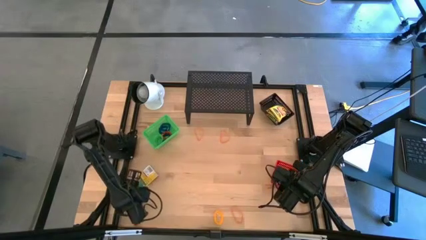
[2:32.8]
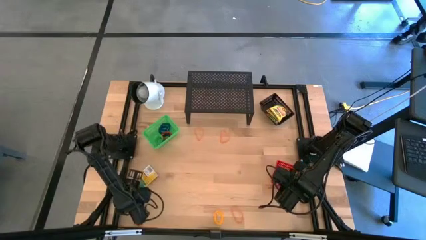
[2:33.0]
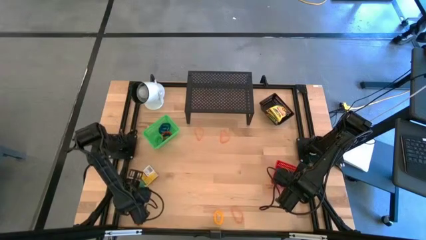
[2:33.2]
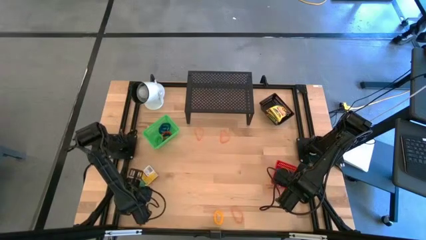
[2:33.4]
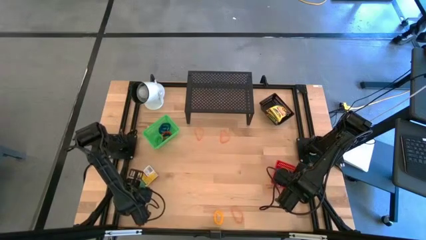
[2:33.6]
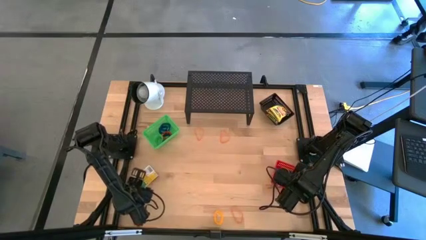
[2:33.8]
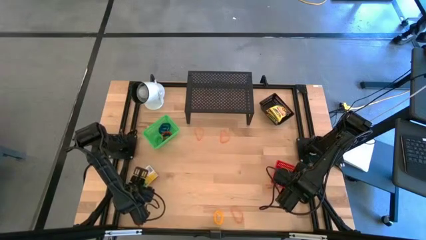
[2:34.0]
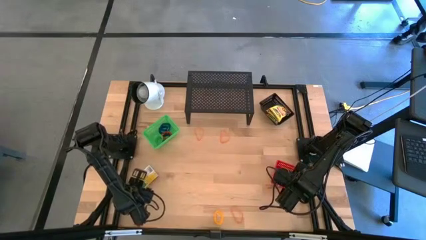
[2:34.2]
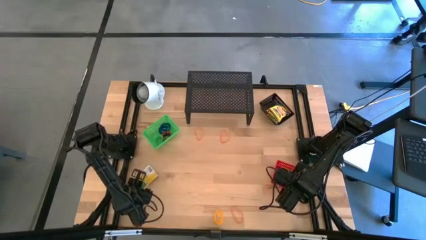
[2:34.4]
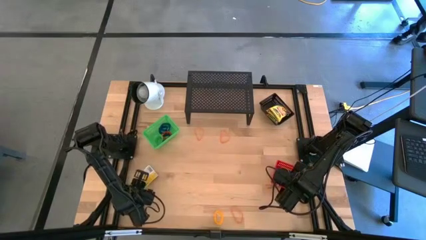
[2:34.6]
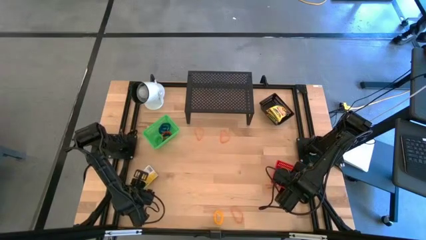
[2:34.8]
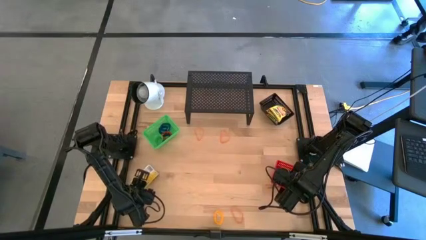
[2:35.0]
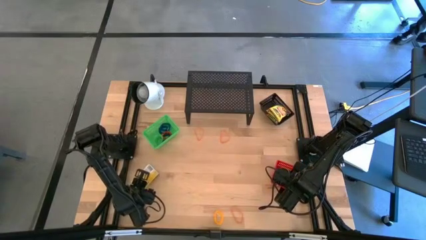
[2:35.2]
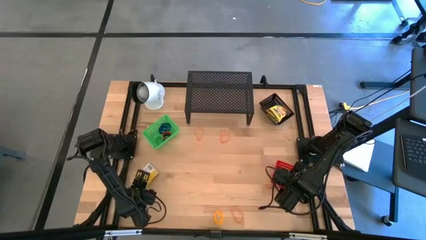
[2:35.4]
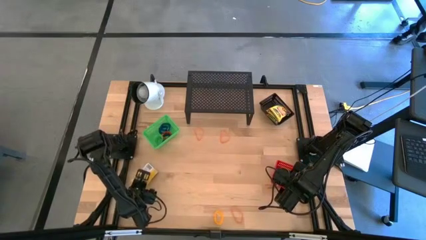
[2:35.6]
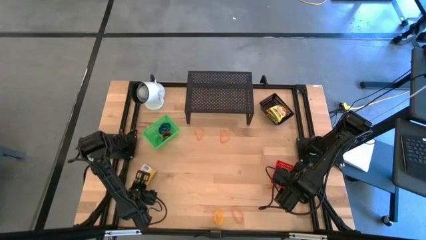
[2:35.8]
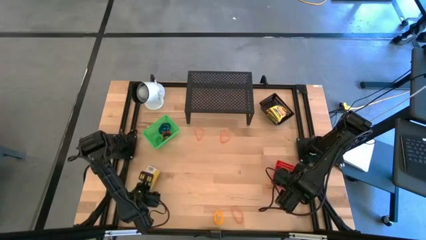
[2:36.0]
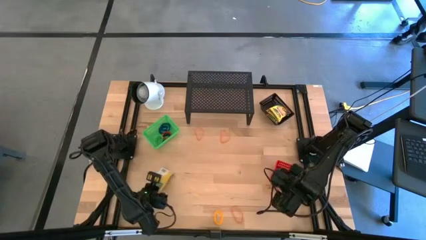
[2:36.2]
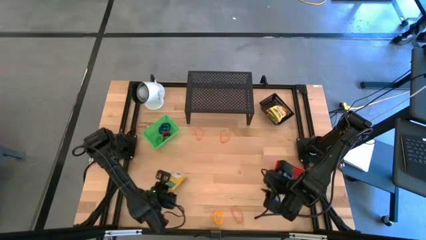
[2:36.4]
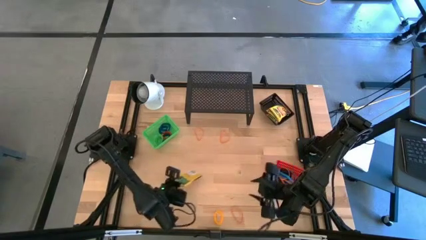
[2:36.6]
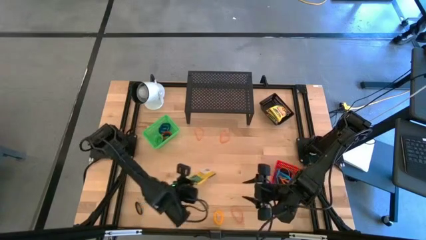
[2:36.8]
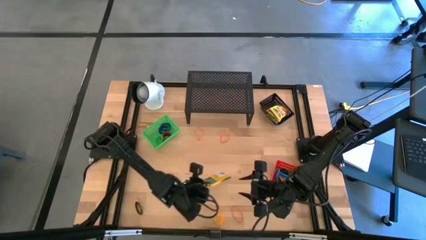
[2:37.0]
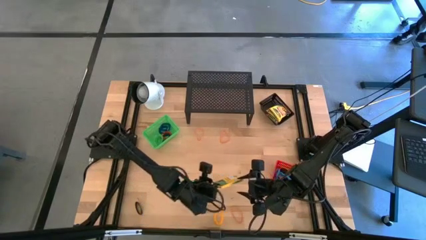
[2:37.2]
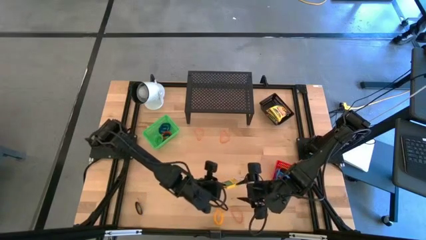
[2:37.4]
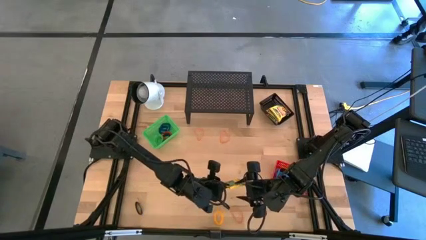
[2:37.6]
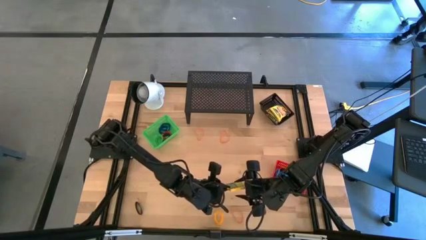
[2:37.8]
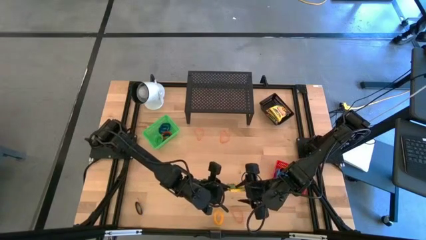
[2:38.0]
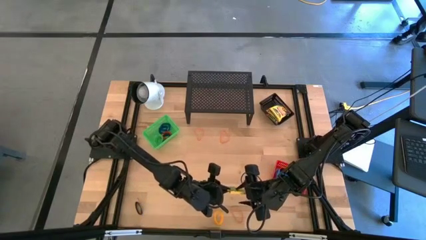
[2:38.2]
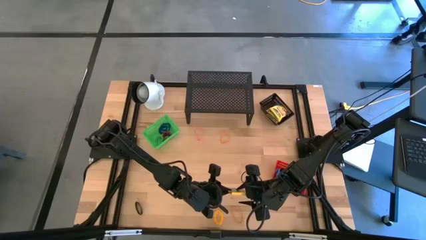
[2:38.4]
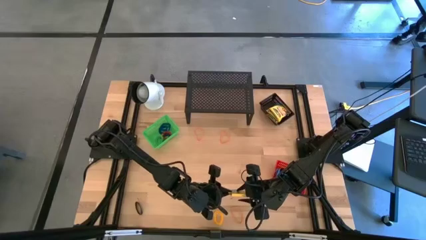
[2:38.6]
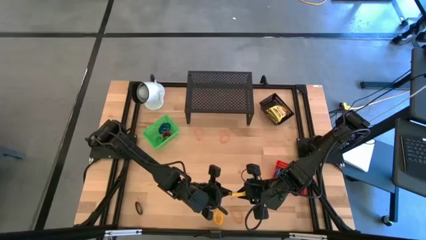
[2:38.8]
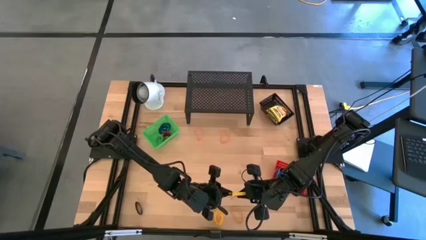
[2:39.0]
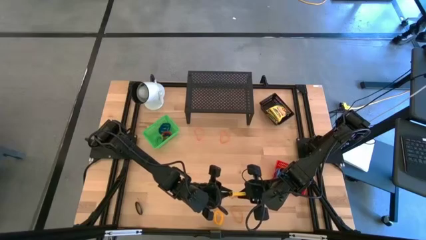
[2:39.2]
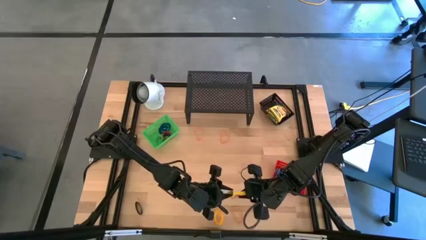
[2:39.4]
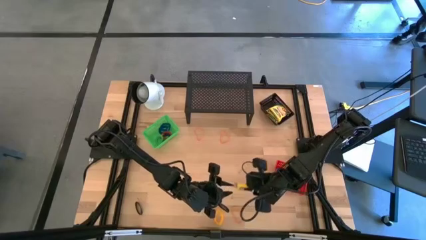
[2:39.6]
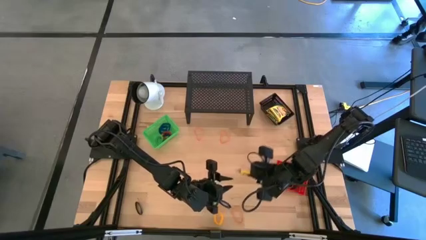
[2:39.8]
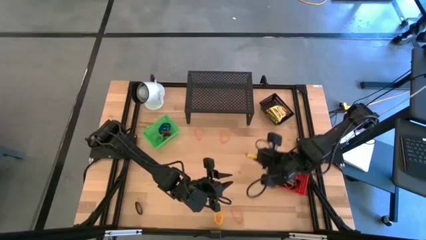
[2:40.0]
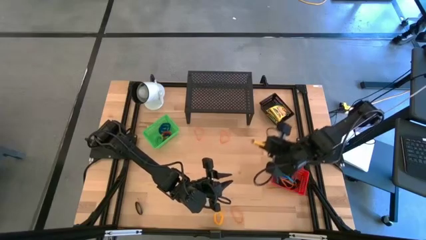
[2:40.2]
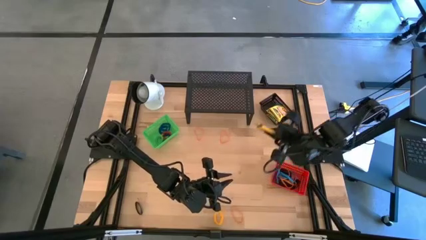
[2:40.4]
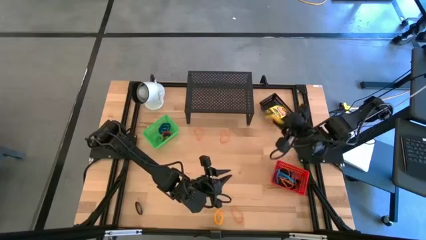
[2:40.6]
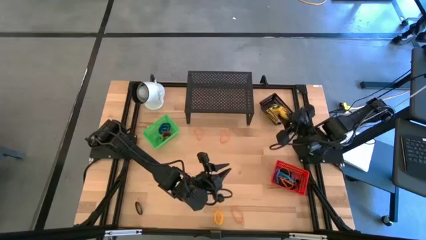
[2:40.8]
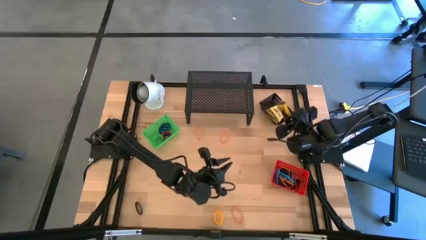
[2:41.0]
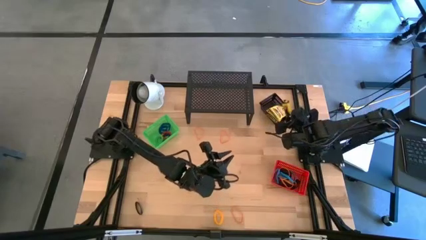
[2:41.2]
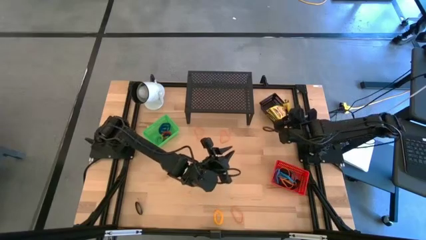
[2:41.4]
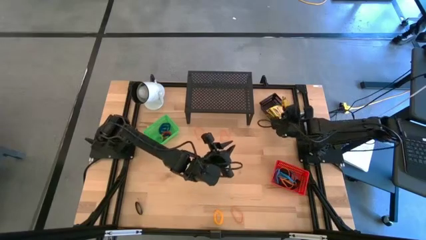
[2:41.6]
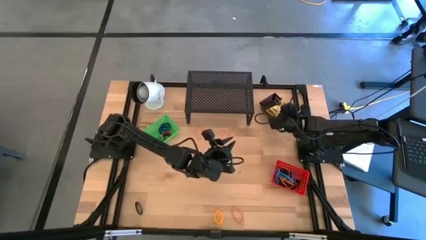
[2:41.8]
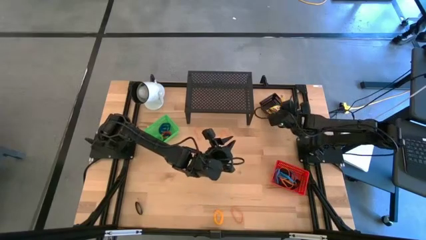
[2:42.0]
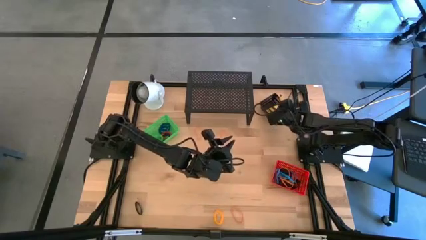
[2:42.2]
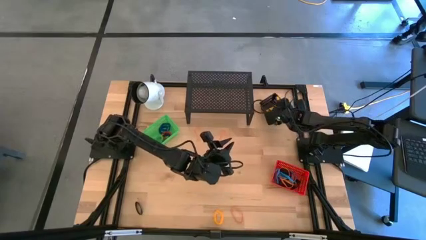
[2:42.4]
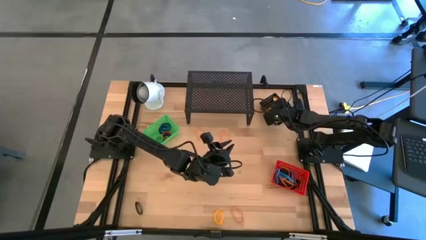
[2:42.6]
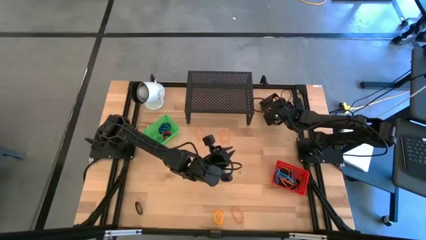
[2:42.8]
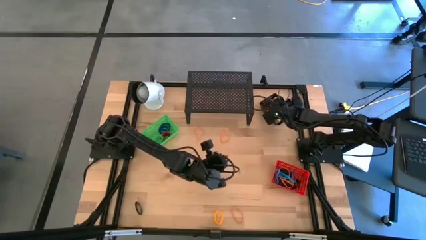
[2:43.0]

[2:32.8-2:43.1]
Task: Pick & Place Office Desk Supplies
Put the crayon box into the black bin

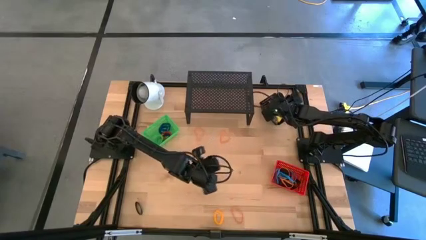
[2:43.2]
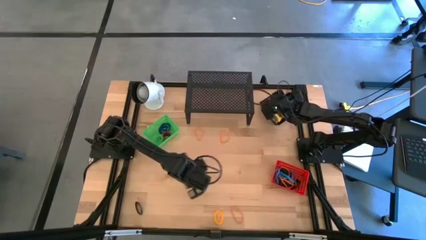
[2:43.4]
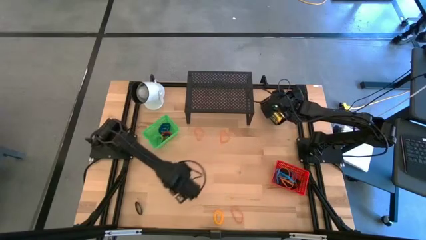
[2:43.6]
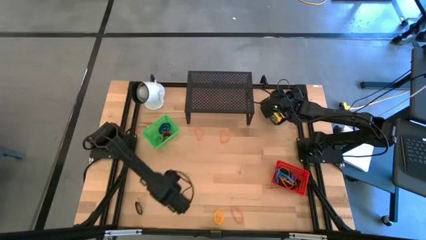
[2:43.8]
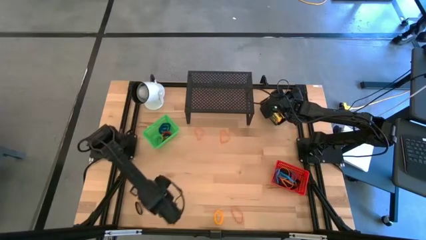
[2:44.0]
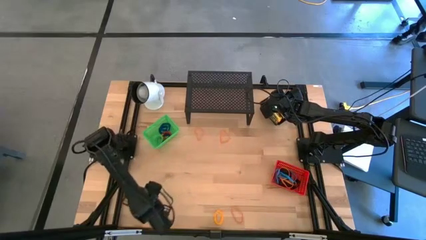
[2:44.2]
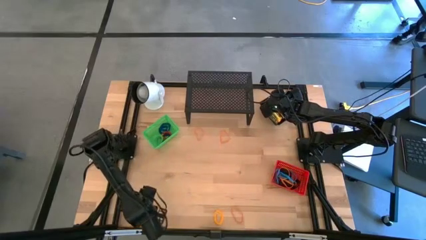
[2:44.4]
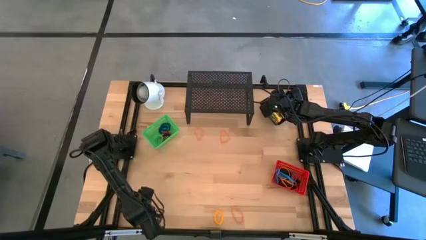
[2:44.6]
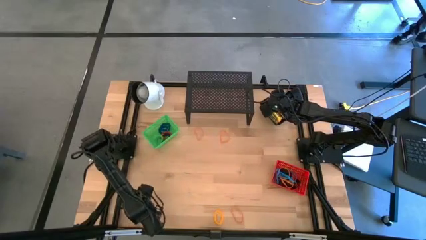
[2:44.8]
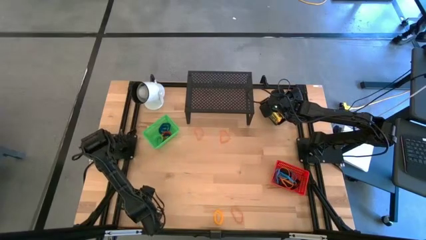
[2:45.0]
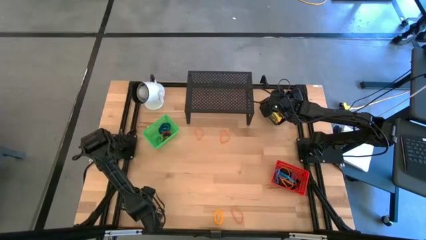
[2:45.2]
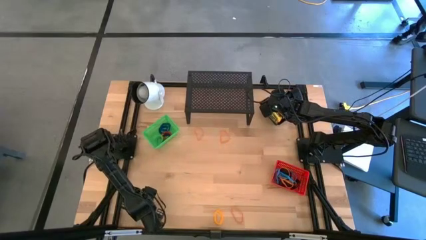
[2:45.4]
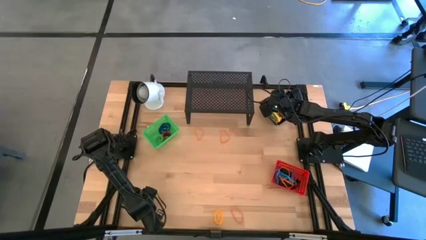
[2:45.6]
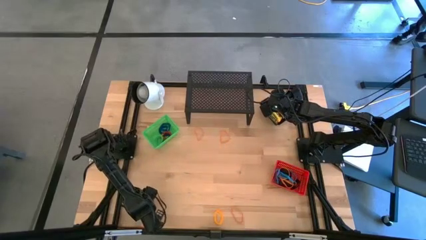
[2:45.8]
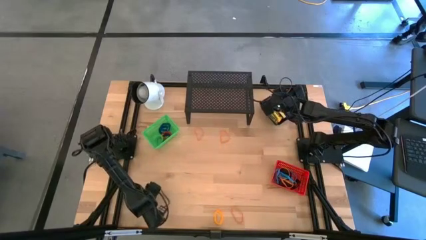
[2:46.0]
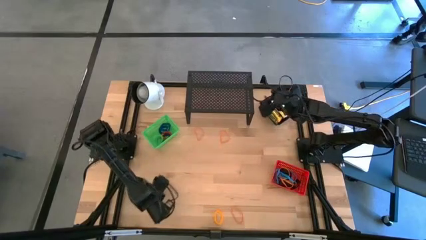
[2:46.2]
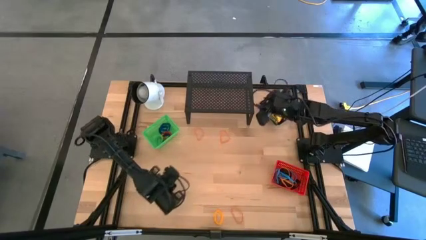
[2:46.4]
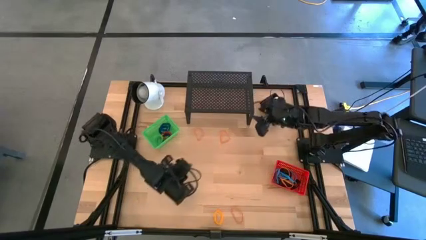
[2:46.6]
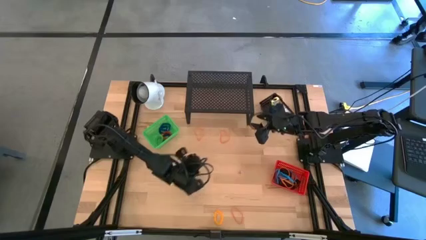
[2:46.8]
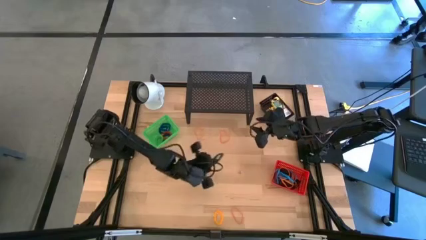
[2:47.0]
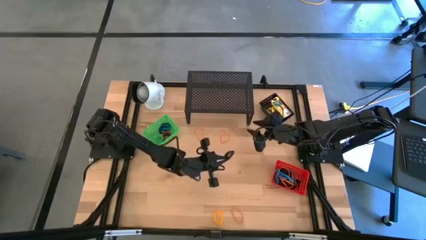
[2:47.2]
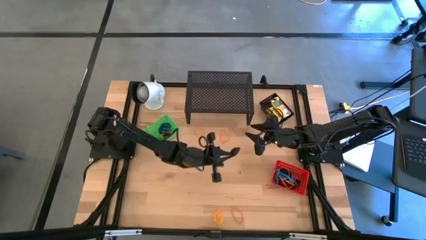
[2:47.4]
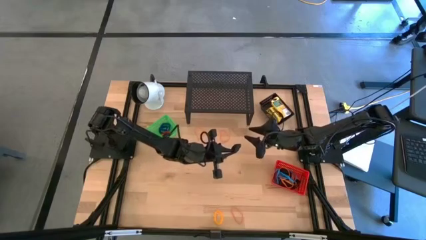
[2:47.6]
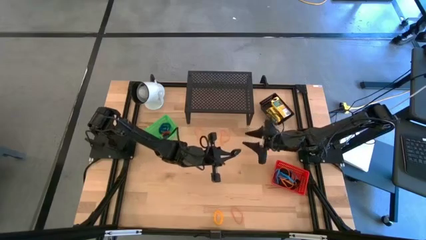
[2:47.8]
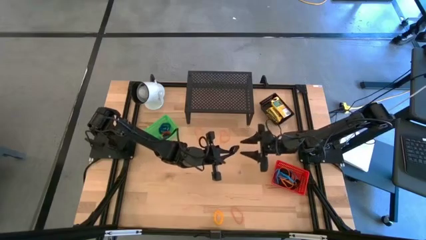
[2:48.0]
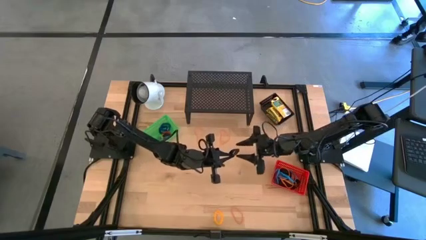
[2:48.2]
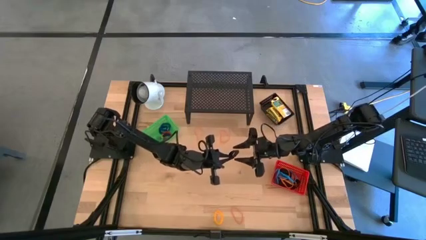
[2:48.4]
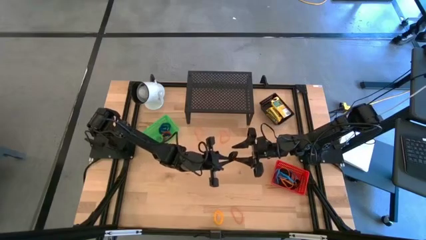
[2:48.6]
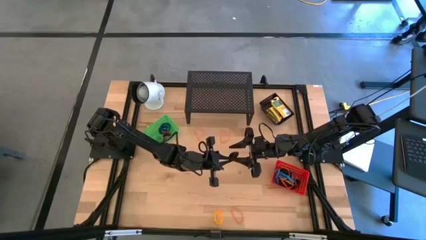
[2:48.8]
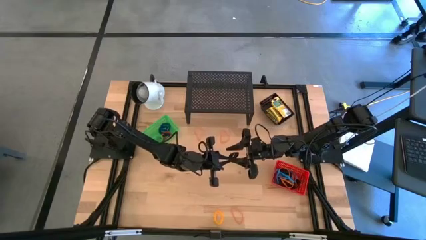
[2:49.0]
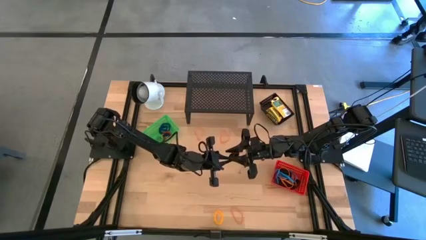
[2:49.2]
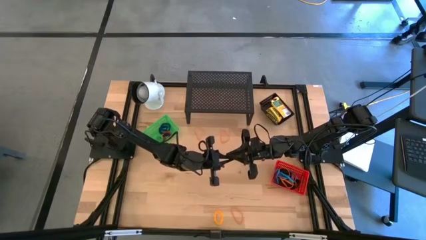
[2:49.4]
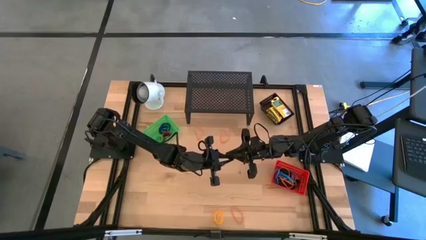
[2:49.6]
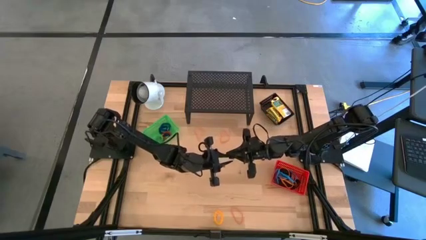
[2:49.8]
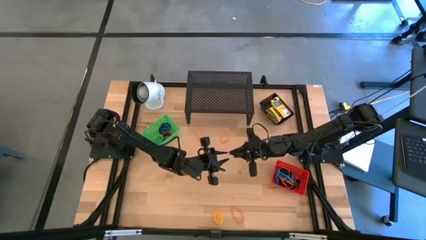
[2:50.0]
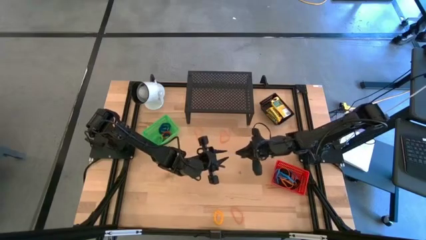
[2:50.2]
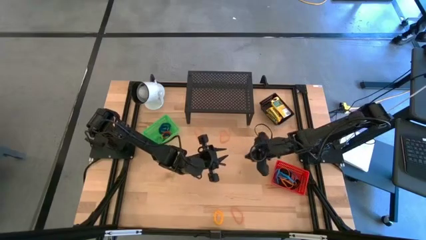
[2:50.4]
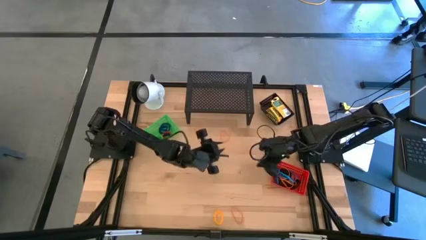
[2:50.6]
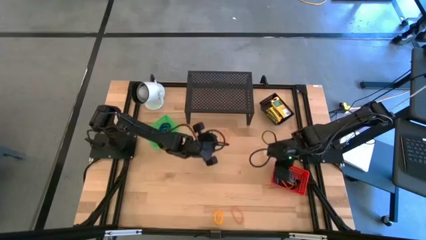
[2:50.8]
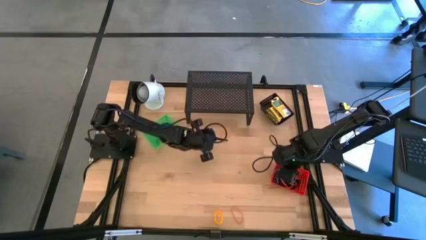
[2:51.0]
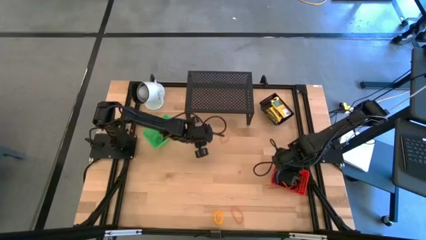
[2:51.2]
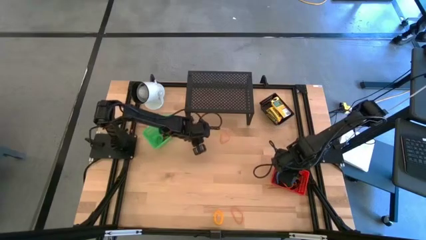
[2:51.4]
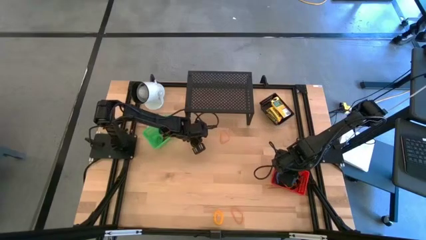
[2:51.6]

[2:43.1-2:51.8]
Put the black rubber band into the red bin
